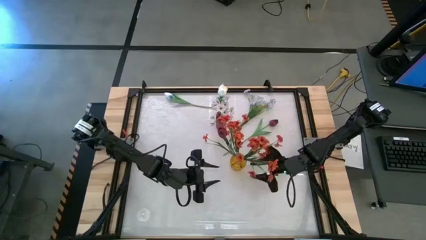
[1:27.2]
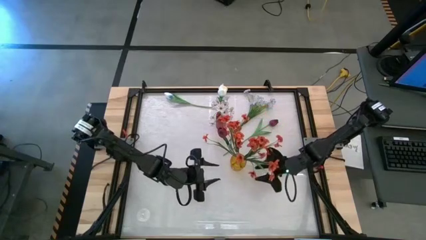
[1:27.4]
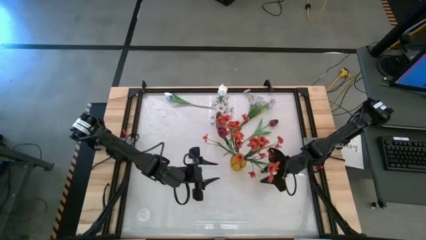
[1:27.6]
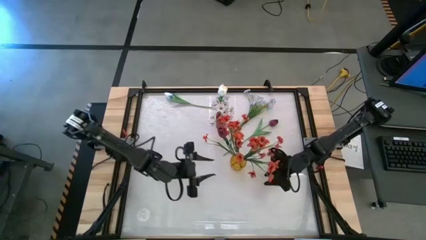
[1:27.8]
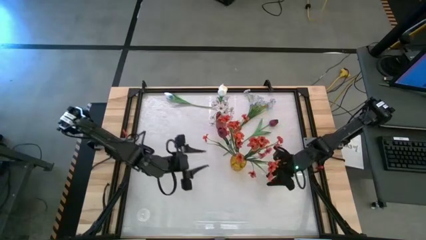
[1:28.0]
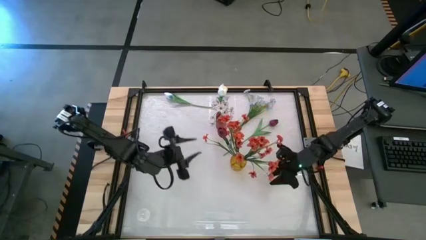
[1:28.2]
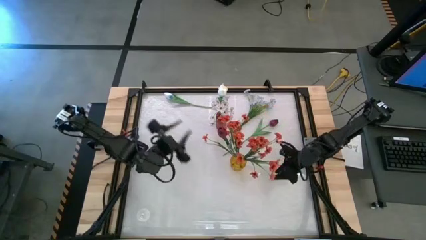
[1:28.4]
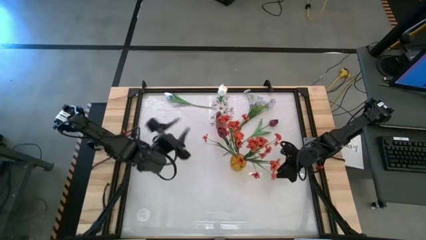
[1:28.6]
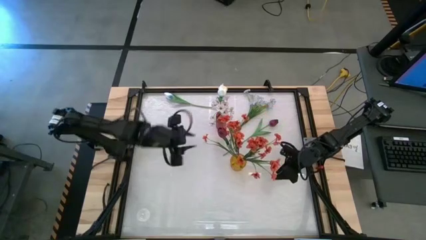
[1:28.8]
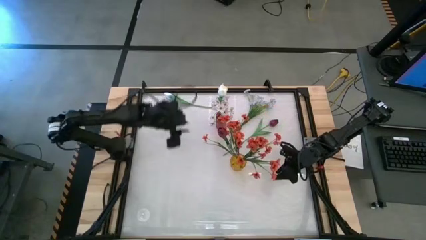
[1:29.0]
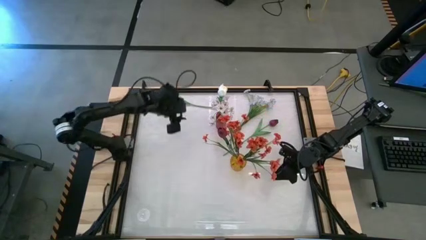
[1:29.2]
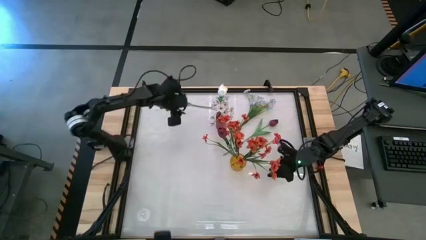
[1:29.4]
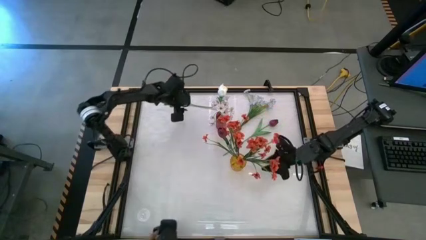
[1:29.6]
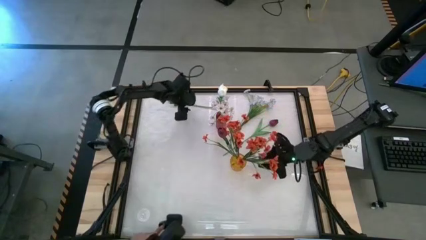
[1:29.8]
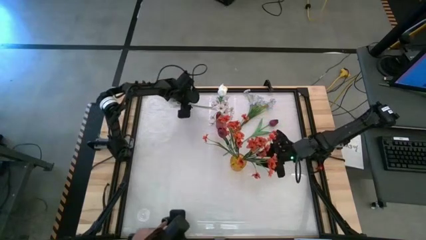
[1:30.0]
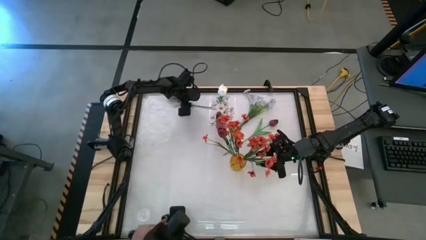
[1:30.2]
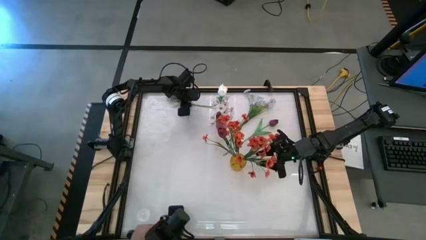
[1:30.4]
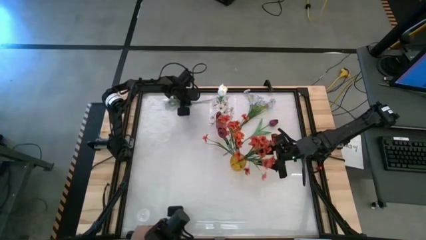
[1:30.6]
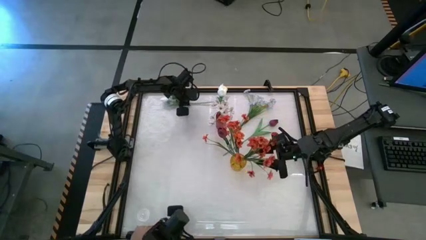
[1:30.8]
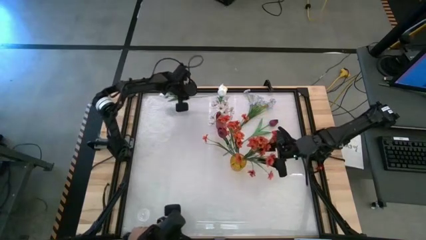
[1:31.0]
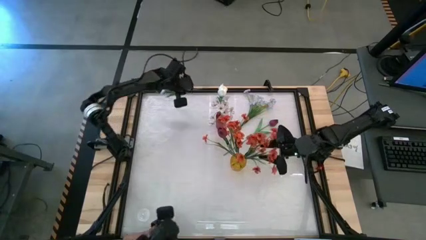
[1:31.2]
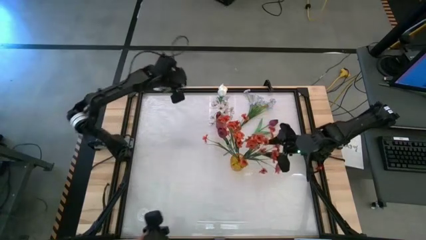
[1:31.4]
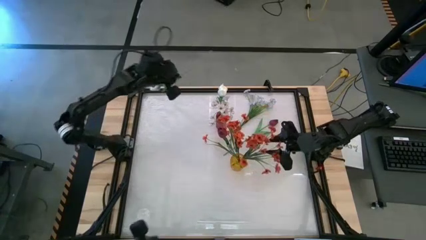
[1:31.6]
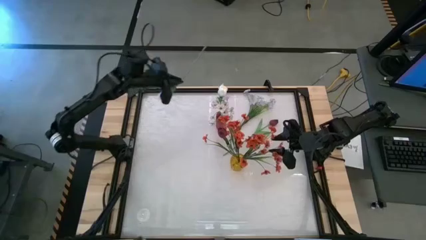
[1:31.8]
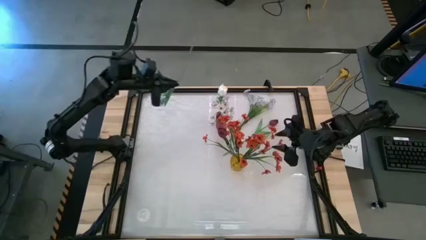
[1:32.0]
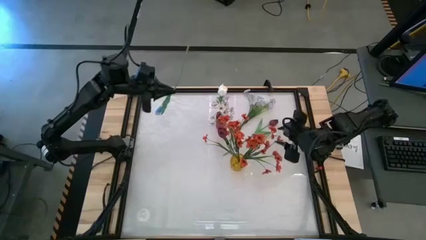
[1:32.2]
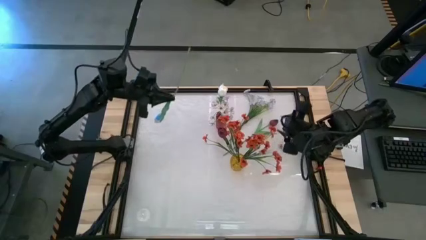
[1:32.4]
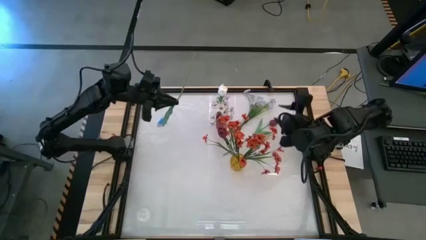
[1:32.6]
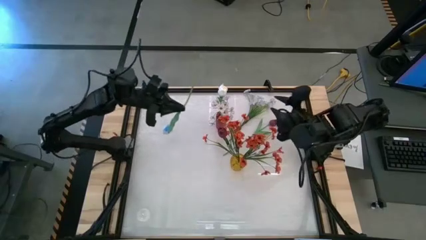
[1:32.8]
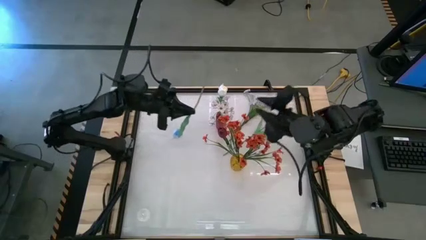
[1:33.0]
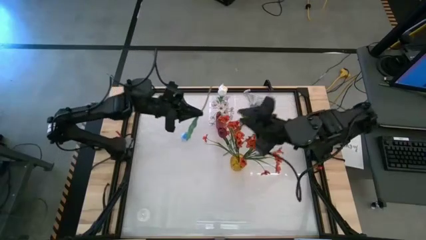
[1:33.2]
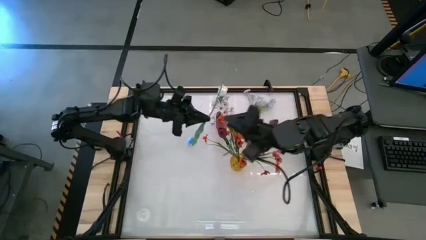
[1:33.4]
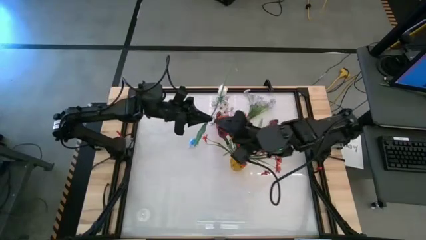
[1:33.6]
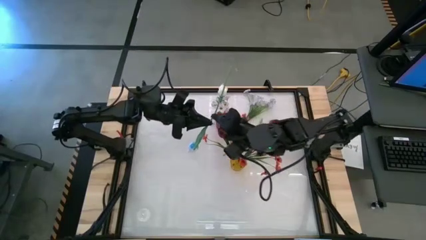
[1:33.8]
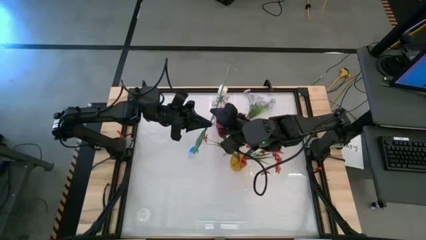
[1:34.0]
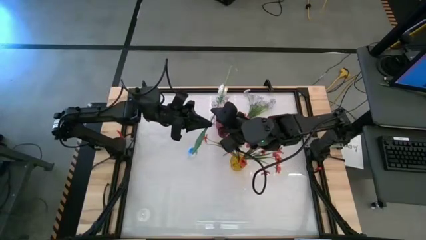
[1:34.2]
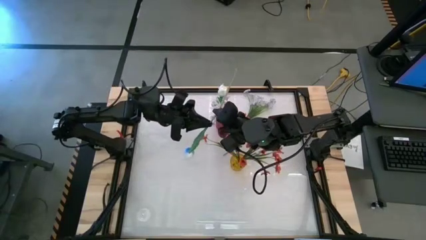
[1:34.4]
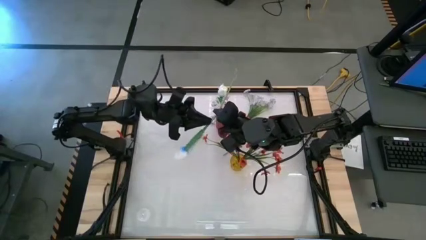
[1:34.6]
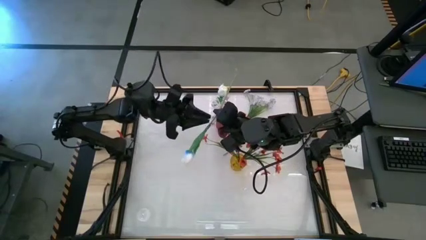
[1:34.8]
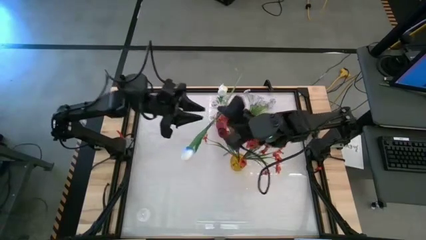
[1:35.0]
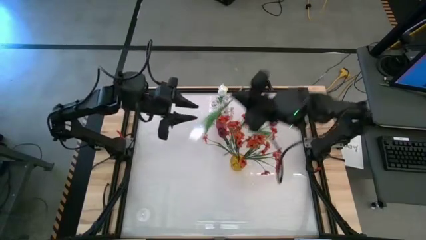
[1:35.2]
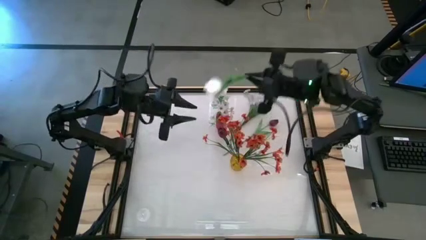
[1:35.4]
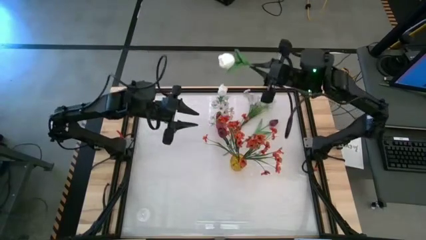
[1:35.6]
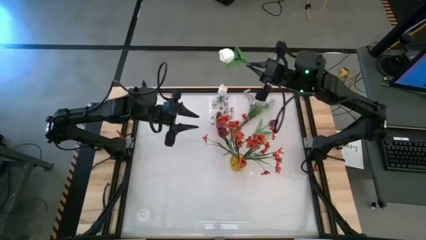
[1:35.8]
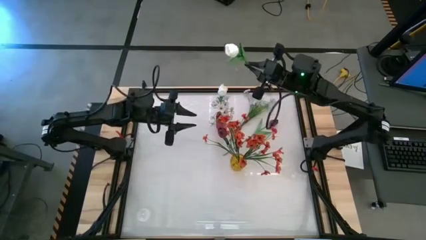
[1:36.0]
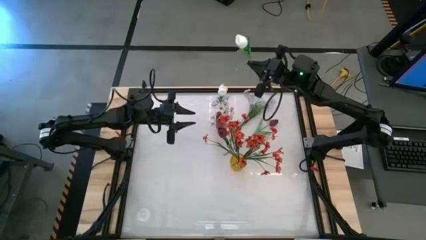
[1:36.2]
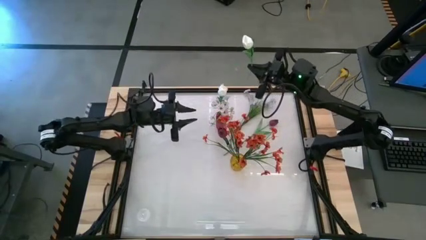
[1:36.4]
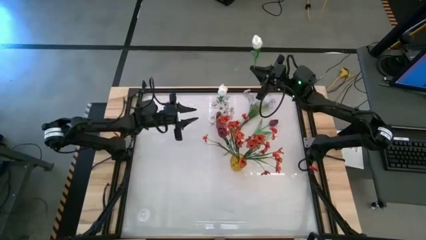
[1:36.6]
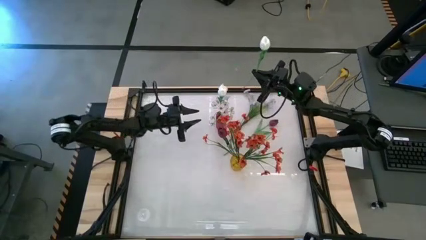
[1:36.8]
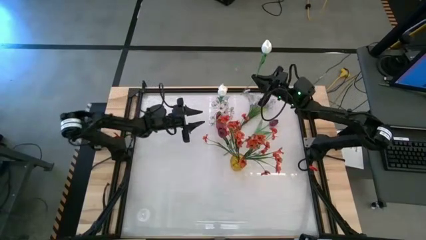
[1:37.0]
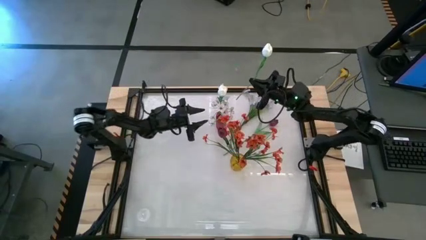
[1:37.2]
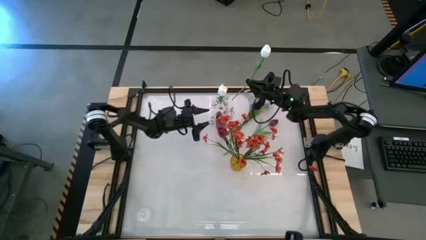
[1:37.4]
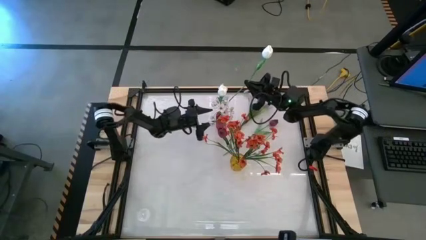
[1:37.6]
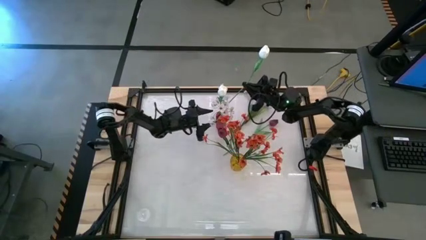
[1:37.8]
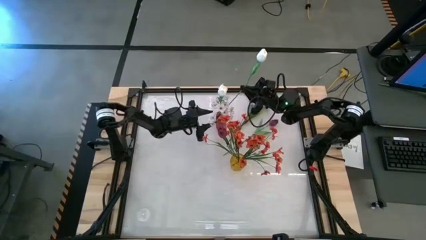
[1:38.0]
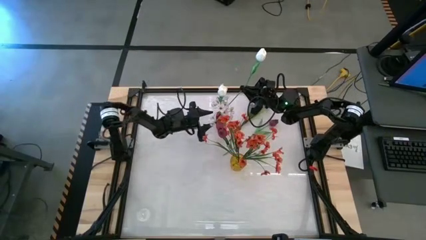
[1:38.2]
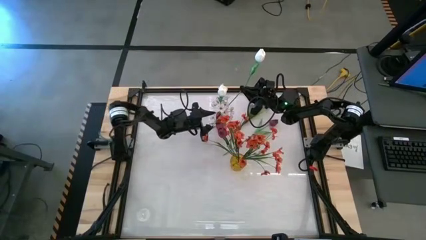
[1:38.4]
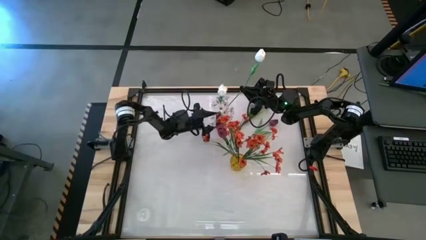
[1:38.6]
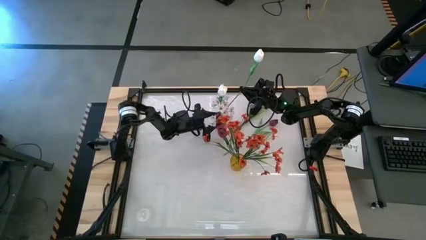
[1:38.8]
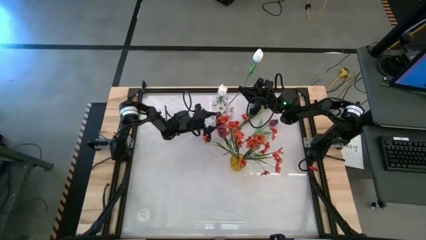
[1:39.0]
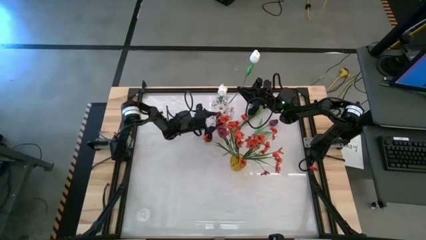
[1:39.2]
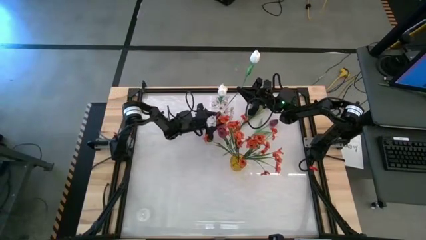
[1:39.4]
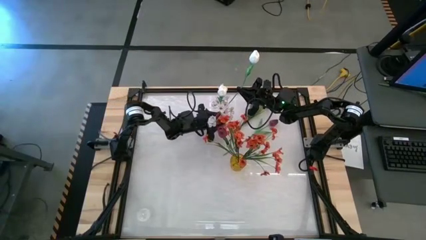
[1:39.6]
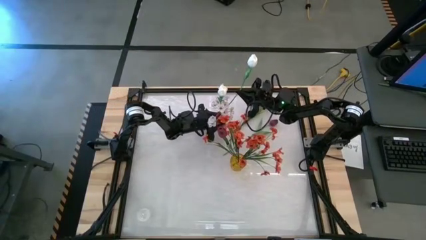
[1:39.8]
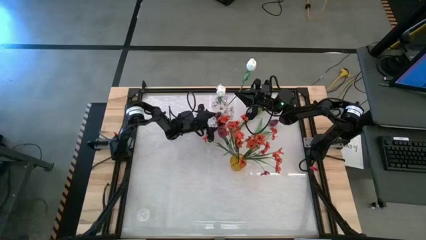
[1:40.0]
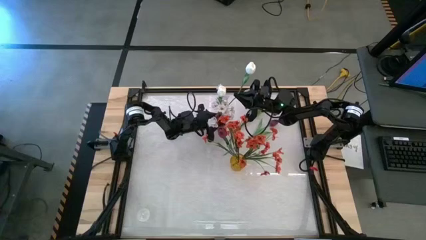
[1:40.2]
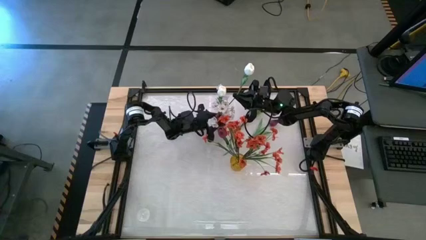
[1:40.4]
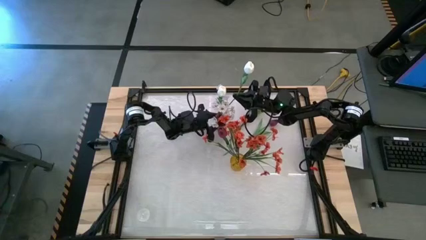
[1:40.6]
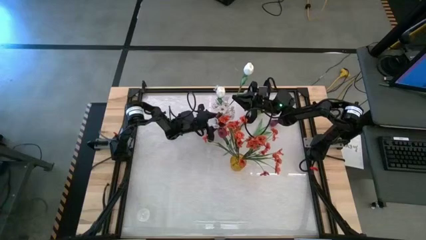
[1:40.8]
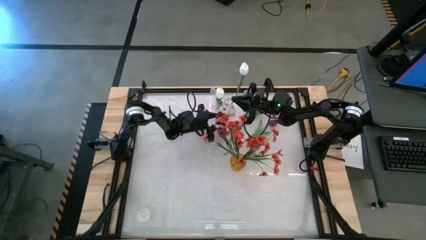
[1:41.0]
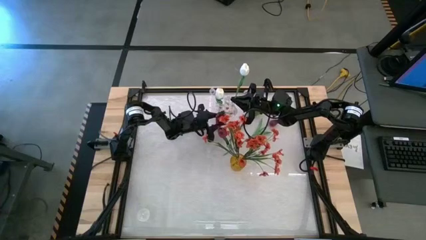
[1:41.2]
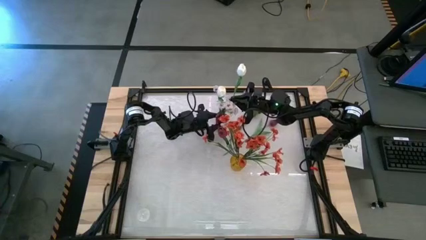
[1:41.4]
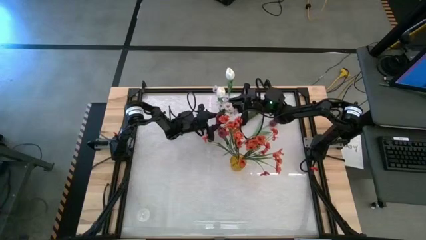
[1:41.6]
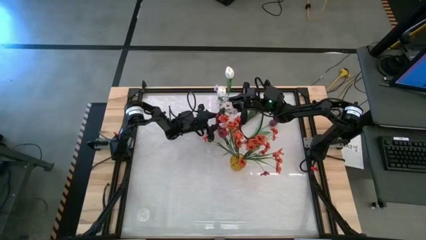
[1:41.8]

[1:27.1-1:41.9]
Task: Sort flowers into vase by color
Put the white flower into the red vase

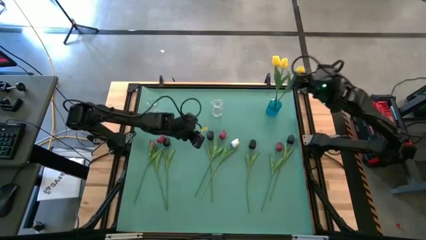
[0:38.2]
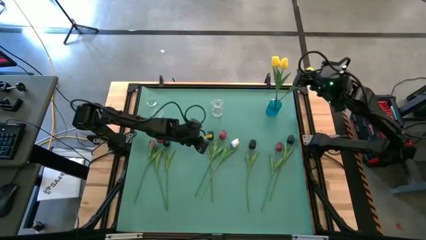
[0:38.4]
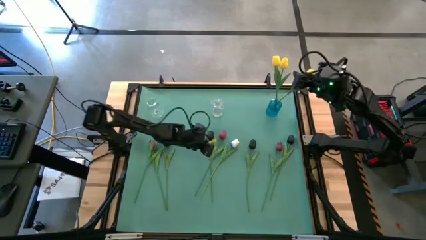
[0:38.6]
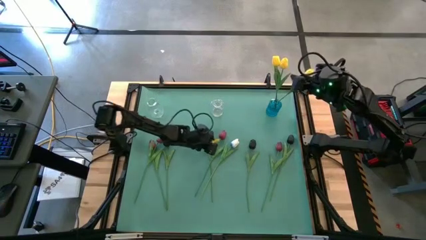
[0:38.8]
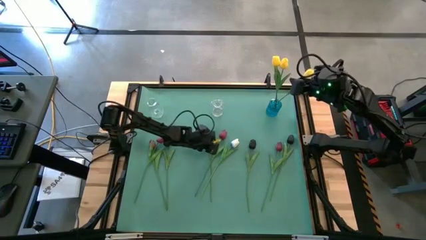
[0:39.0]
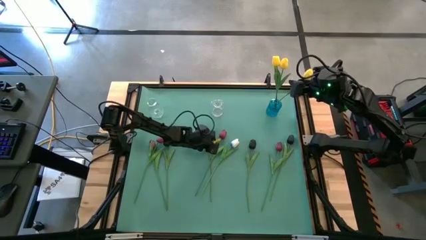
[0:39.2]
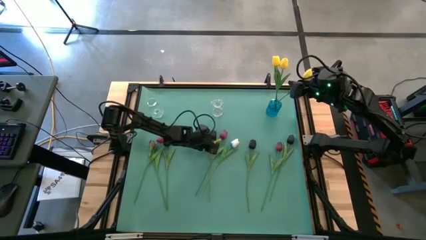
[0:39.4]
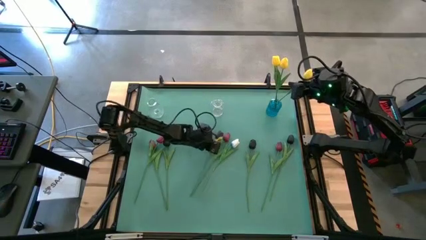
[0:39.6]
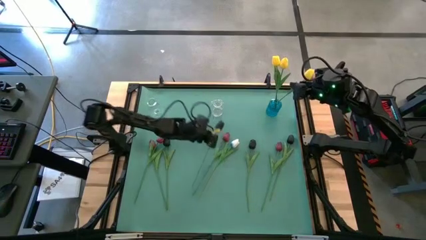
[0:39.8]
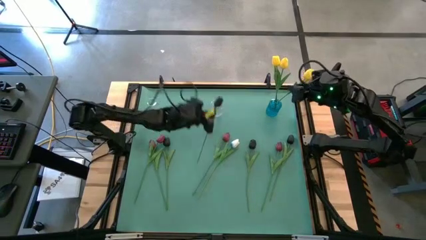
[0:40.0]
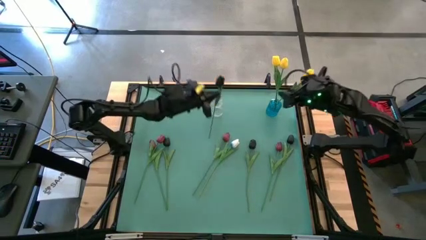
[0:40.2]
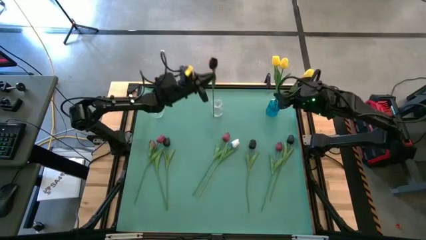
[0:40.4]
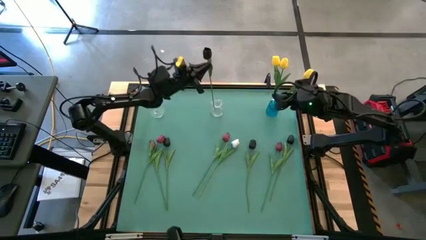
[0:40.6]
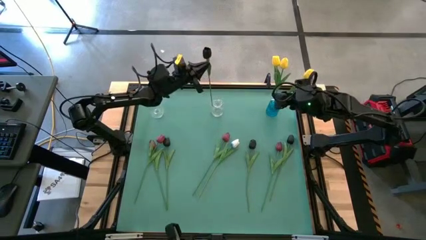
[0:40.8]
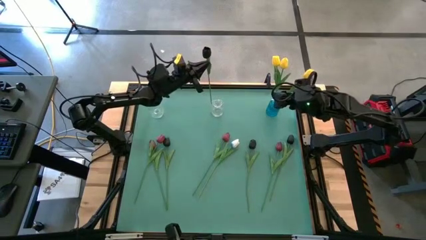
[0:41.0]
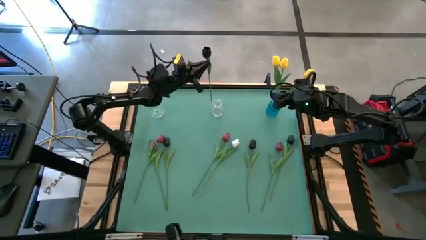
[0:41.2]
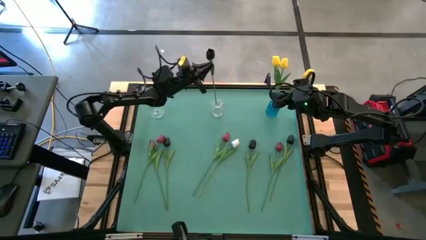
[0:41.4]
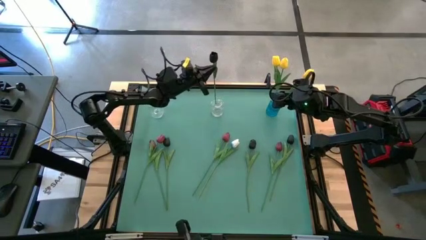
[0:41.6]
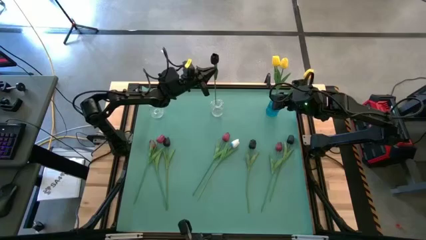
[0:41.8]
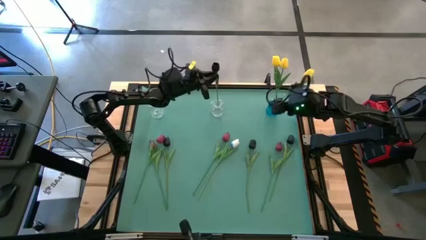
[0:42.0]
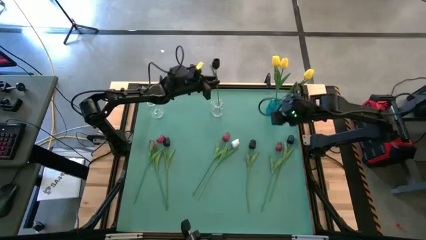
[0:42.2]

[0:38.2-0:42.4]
Task: Sort flowers into vase by color
Put the black tulip into the right transparent vase
